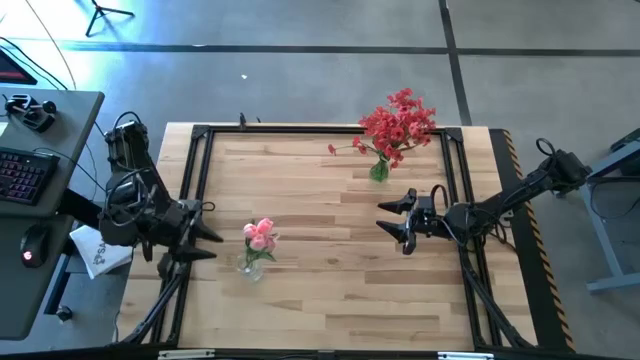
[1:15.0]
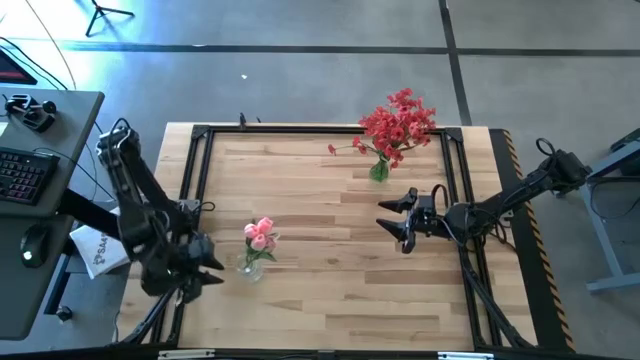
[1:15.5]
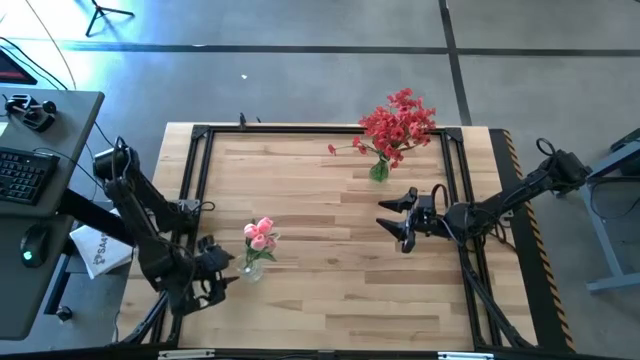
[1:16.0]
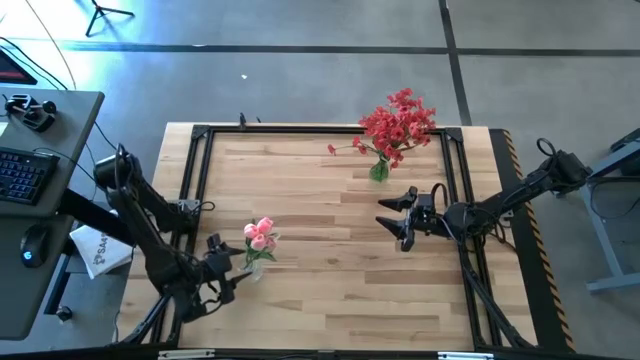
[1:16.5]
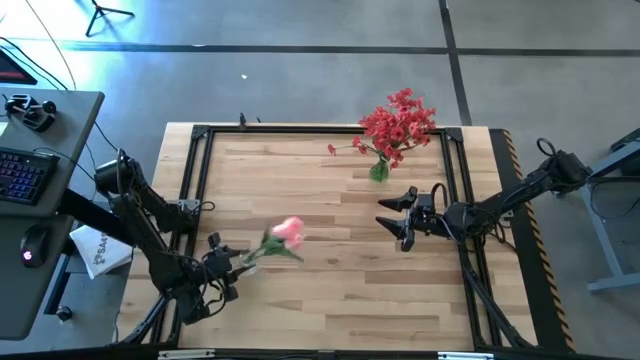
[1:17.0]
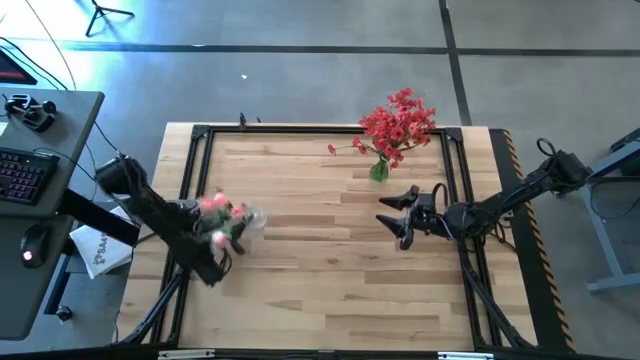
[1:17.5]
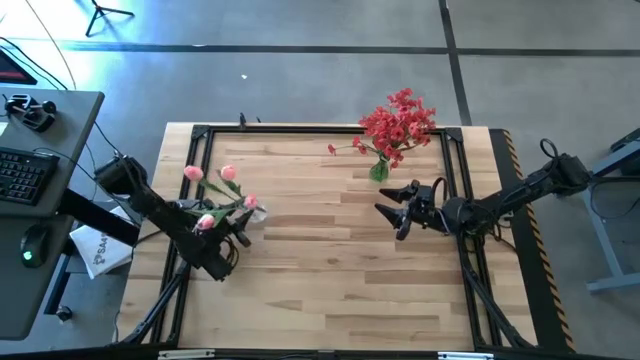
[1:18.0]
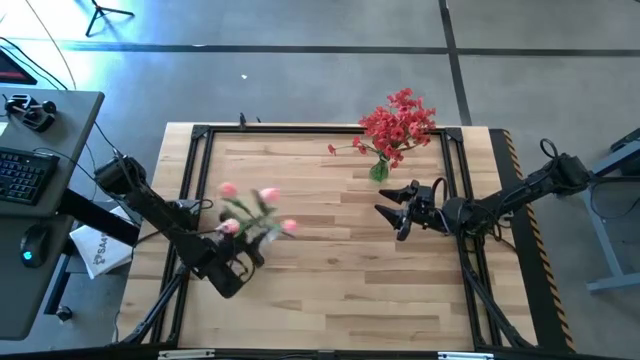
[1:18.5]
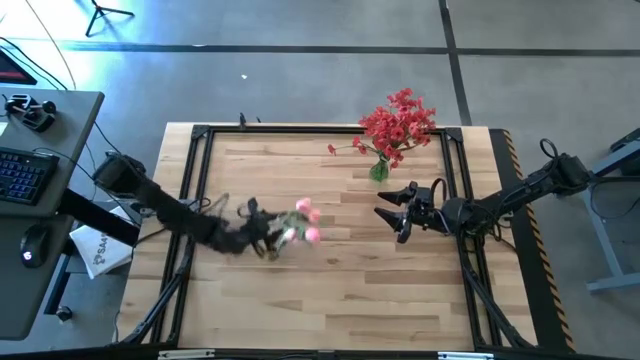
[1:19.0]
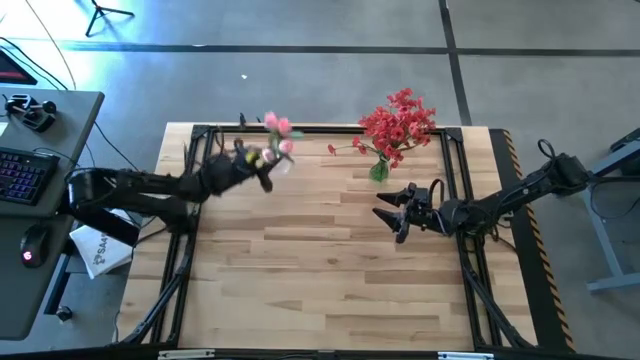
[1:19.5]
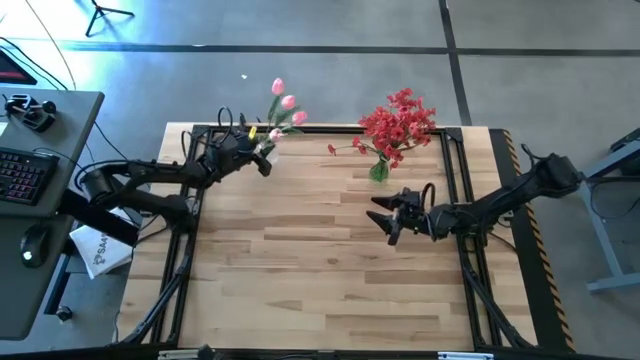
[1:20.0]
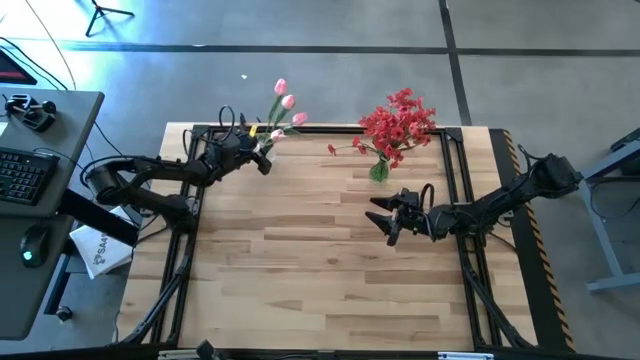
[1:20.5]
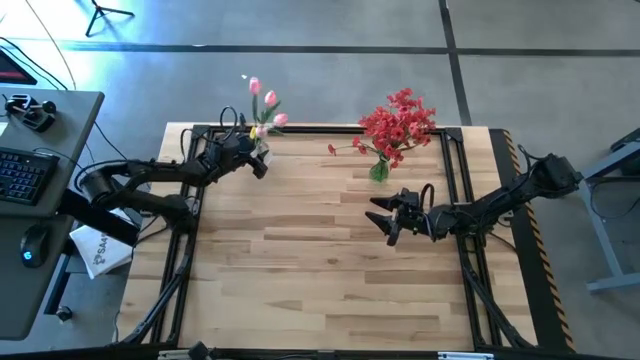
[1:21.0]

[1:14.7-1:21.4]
Task: Sort flowers into vase by color
Move the transparent vase to the top right of the table

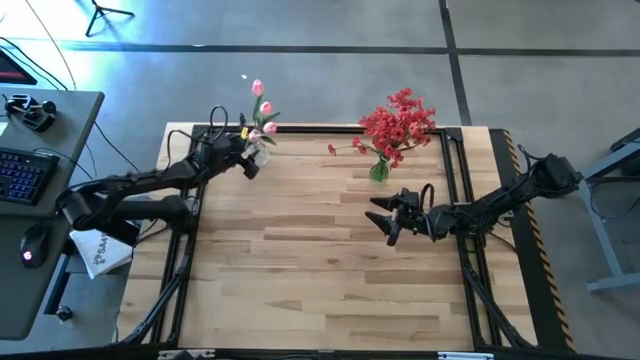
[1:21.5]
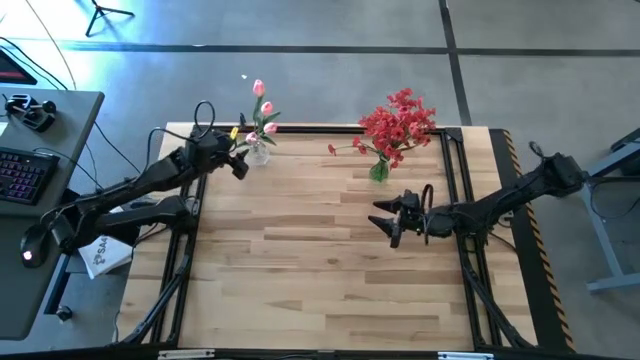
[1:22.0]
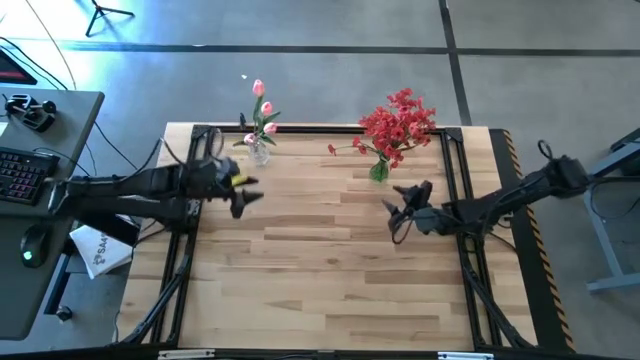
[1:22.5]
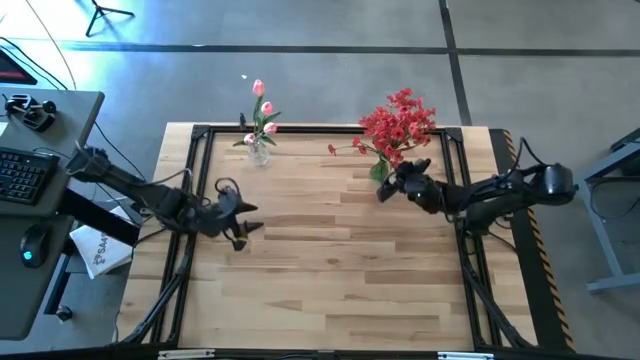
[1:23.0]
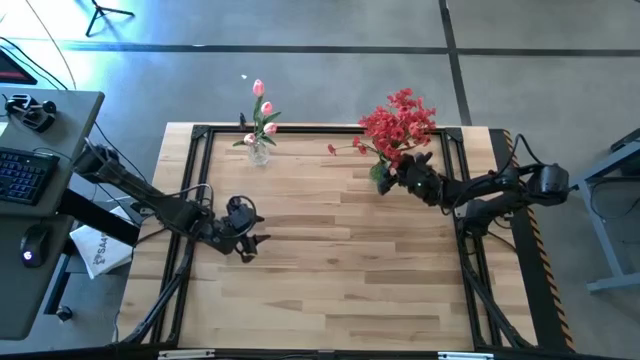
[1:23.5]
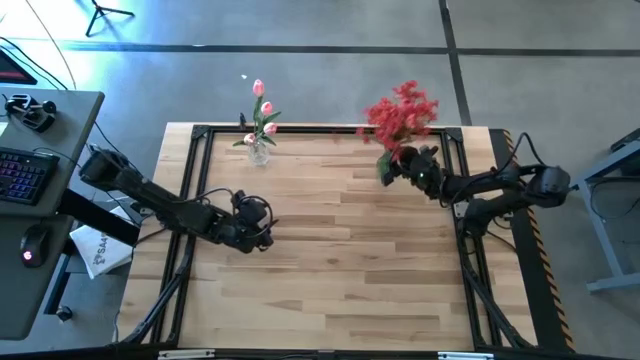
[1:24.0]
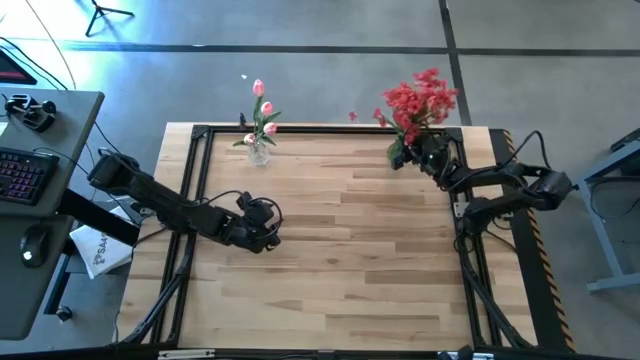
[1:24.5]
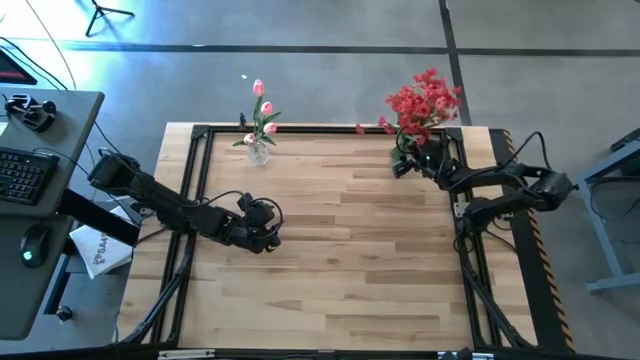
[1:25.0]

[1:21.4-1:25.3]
Adjust the green vase

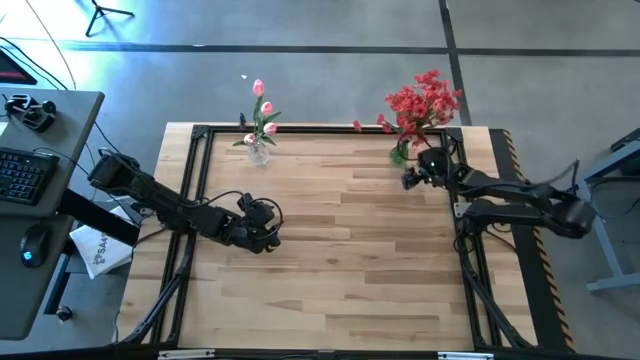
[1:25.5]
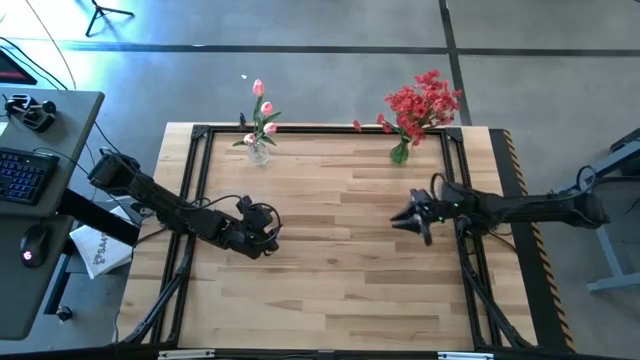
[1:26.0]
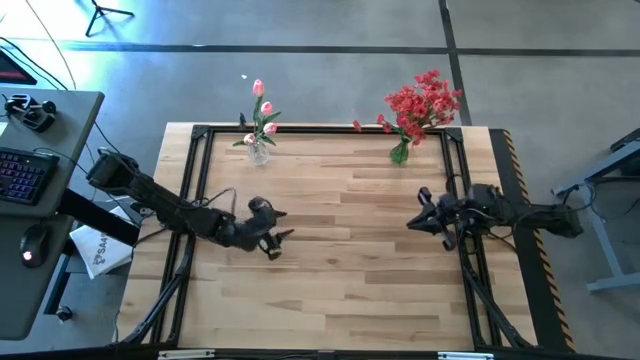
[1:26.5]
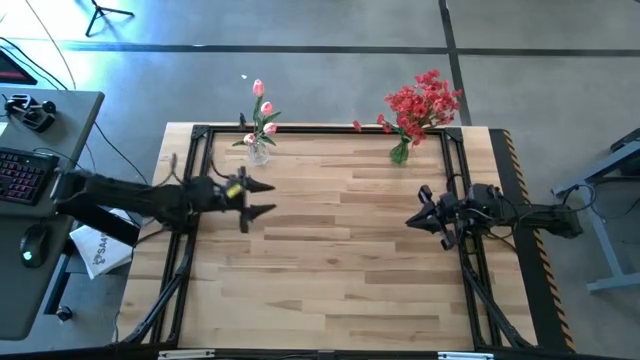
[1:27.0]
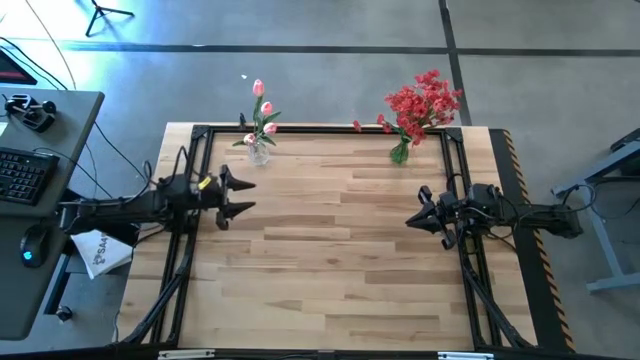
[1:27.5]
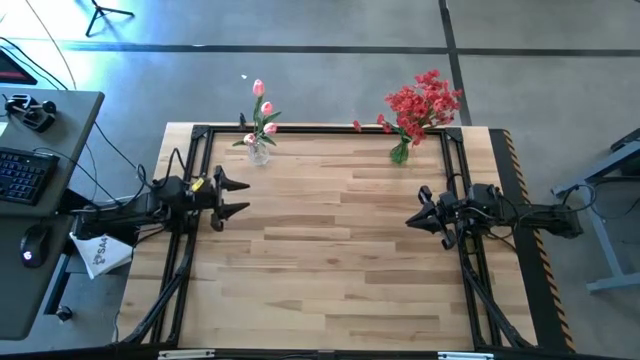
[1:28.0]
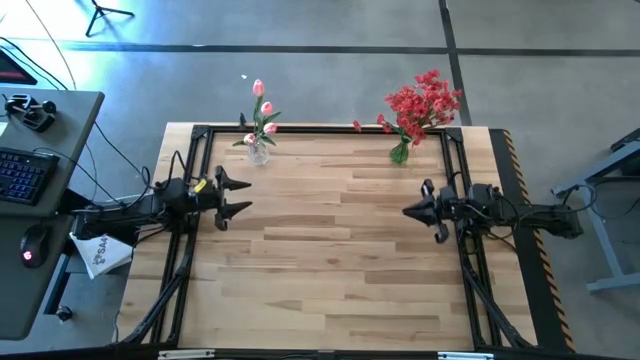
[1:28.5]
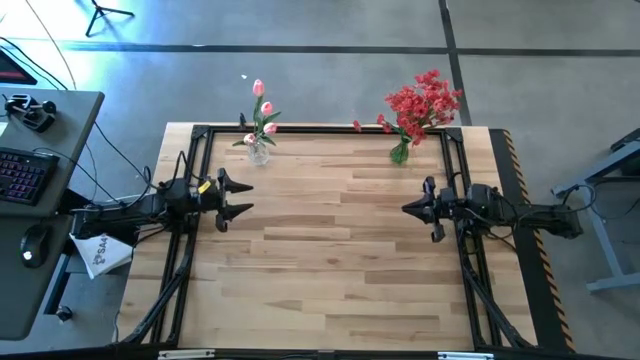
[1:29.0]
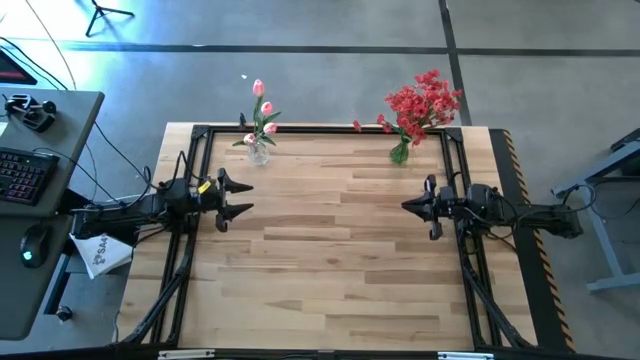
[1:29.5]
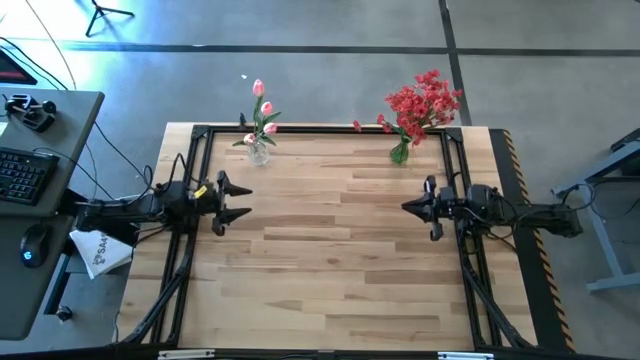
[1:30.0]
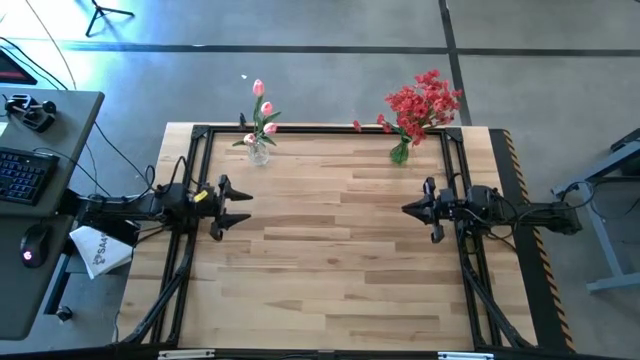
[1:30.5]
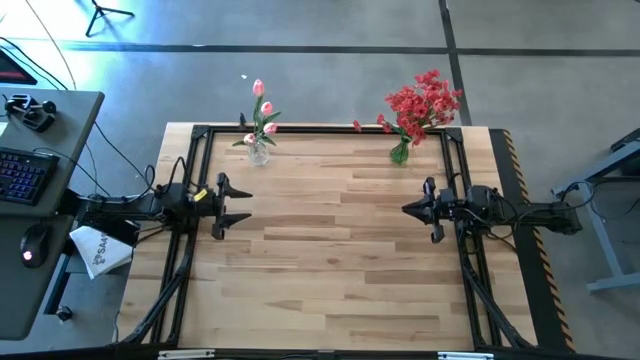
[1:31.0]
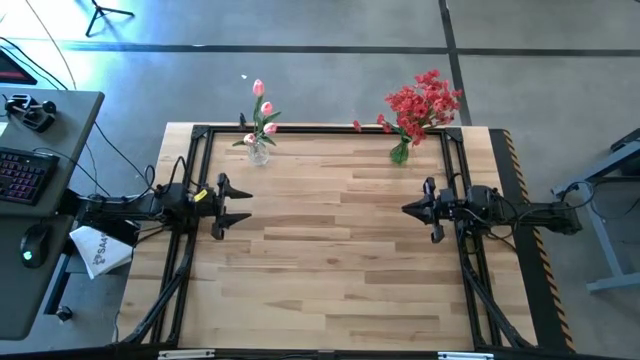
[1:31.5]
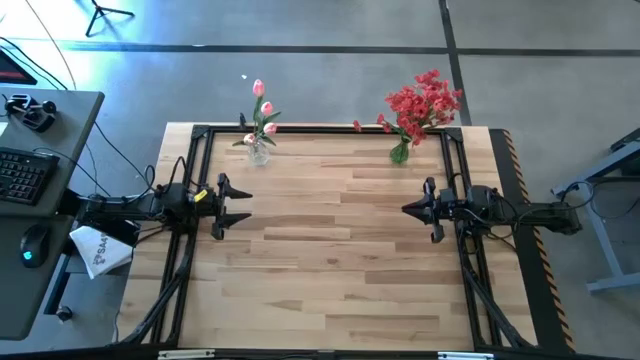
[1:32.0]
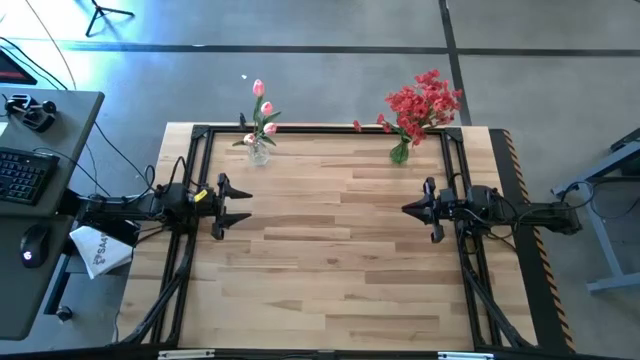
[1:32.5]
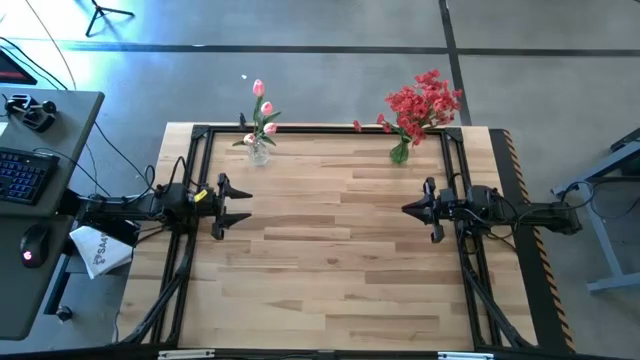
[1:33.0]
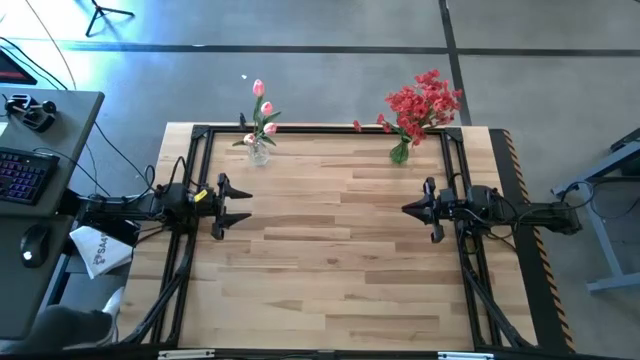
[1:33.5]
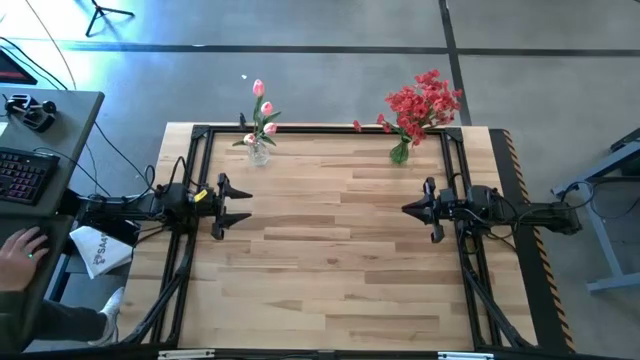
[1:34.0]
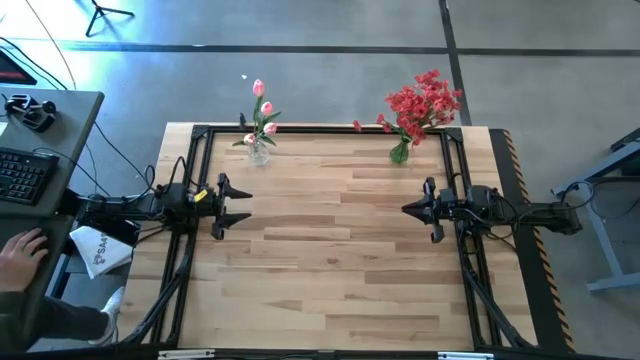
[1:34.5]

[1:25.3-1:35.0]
Return to Home Position

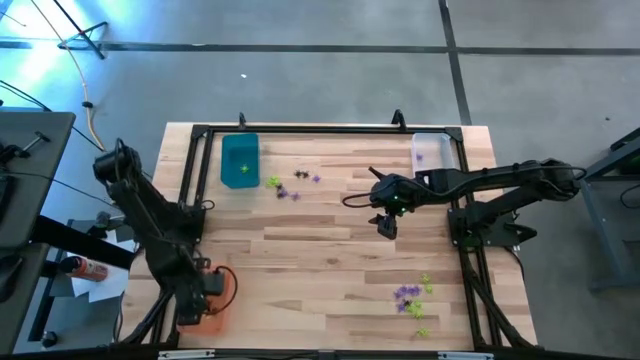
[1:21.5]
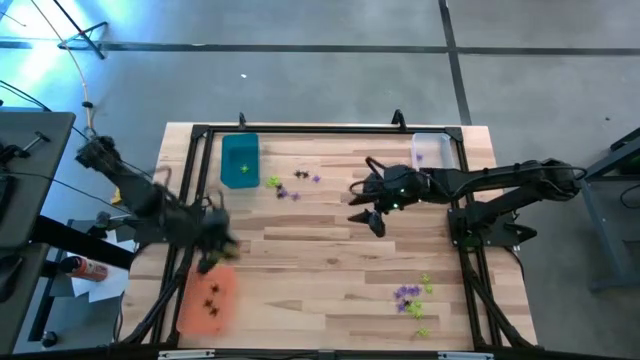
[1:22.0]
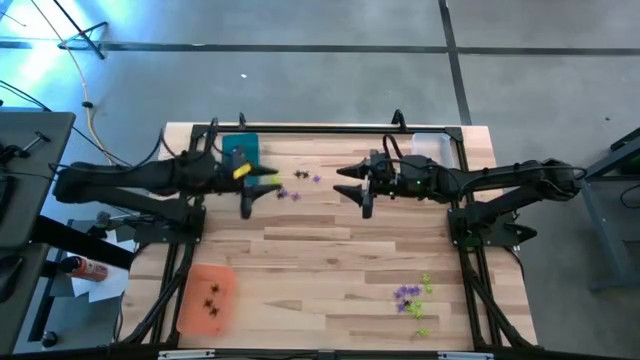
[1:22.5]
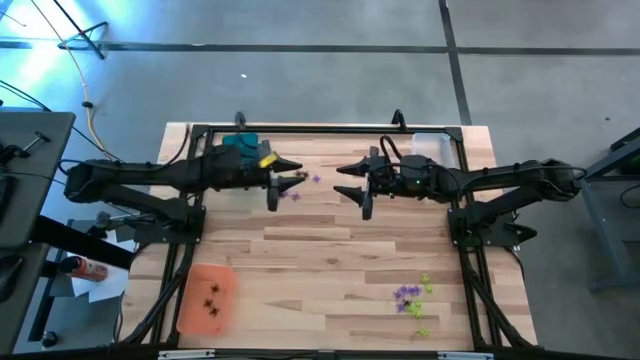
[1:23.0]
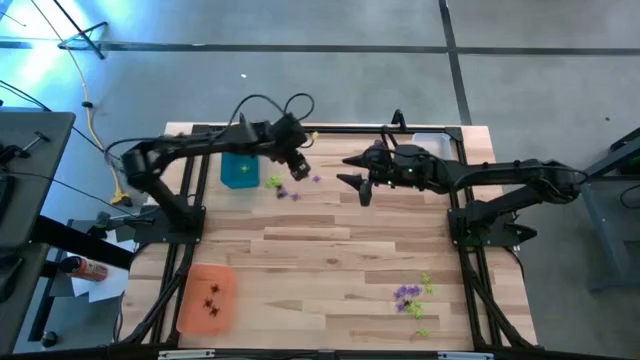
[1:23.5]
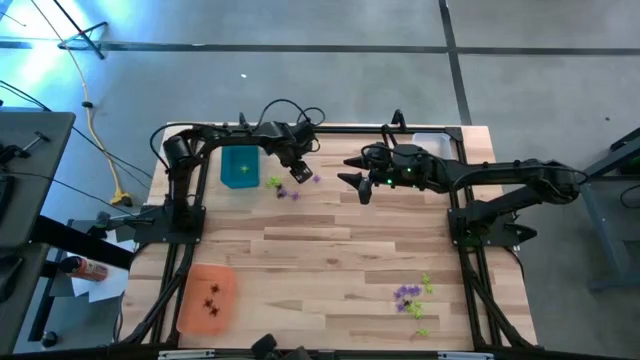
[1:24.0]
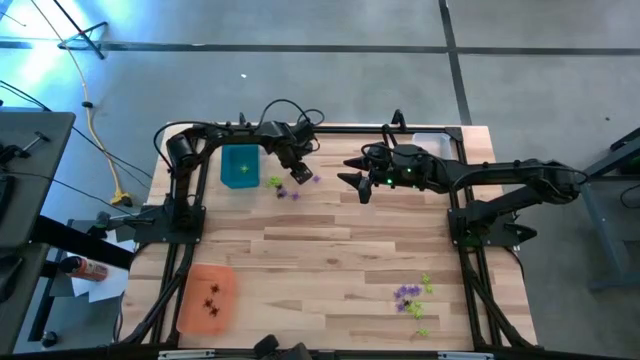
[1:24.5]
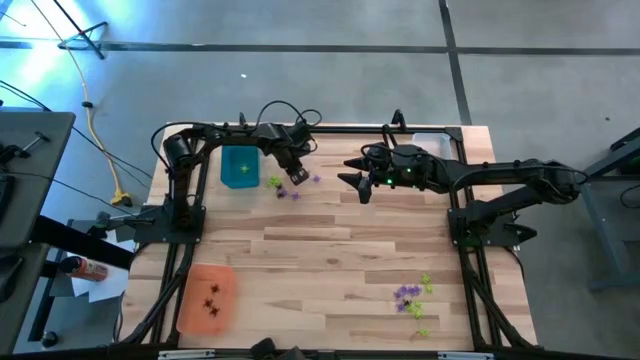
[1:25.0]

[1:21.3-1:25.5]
Task: Sort Halloween decoration
Put the black spider toy into the orange bin
